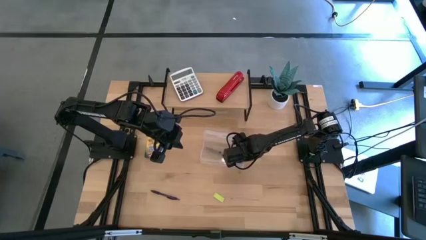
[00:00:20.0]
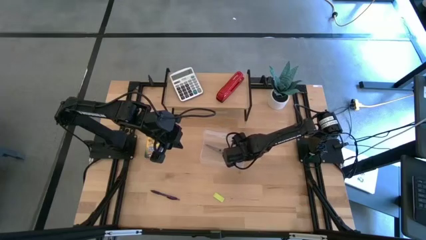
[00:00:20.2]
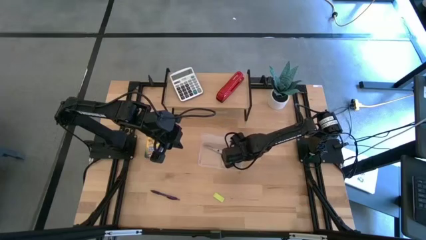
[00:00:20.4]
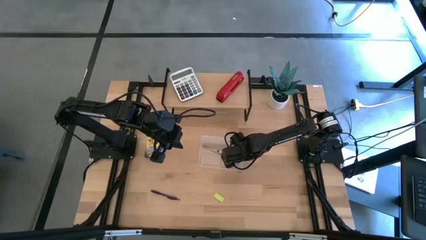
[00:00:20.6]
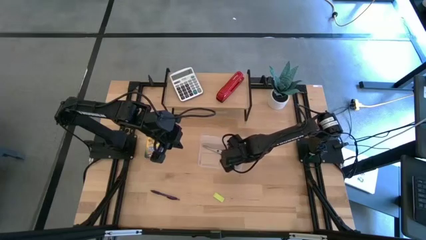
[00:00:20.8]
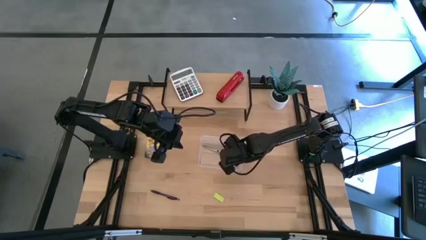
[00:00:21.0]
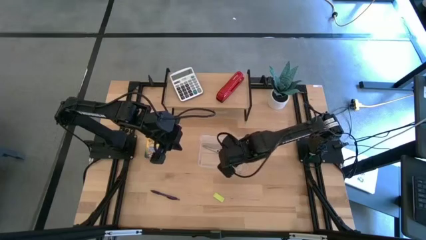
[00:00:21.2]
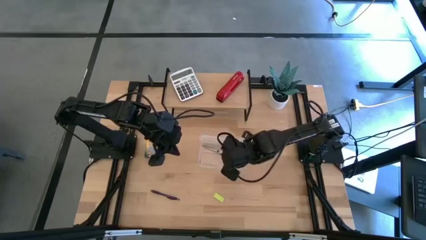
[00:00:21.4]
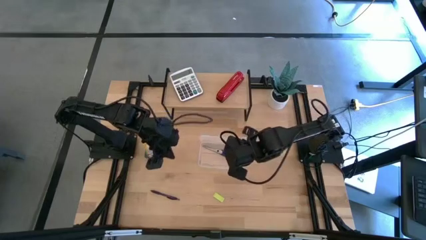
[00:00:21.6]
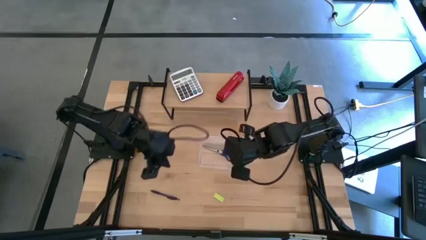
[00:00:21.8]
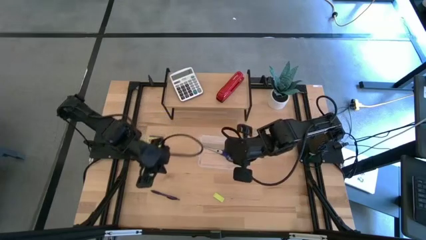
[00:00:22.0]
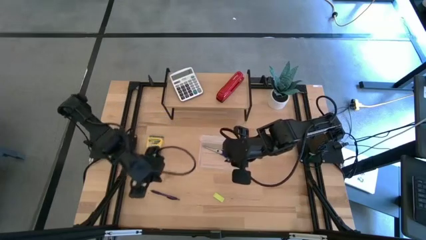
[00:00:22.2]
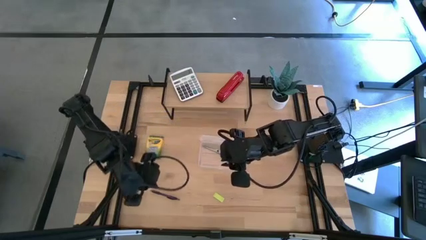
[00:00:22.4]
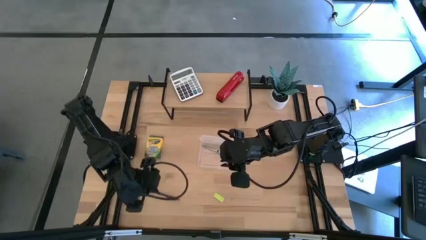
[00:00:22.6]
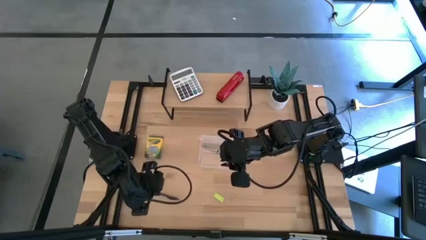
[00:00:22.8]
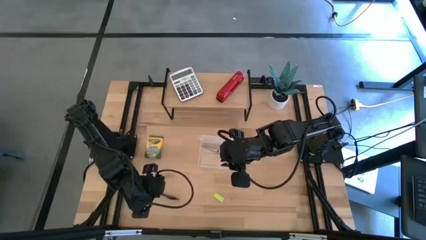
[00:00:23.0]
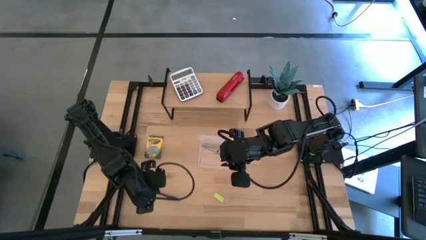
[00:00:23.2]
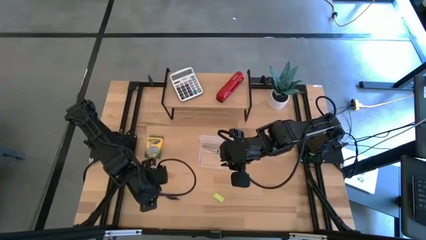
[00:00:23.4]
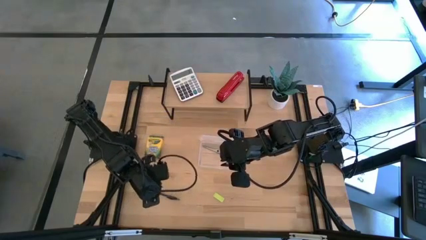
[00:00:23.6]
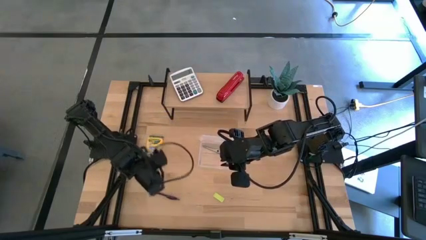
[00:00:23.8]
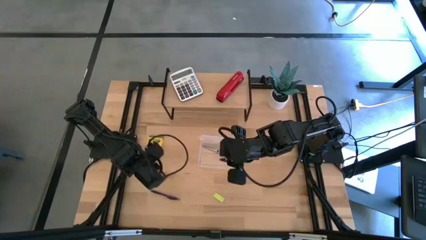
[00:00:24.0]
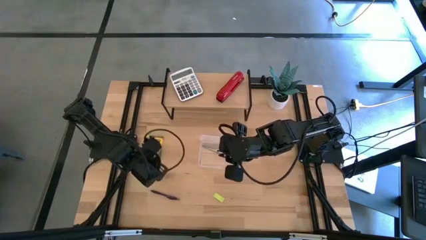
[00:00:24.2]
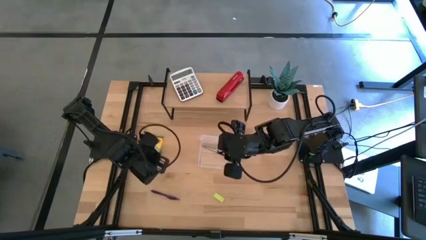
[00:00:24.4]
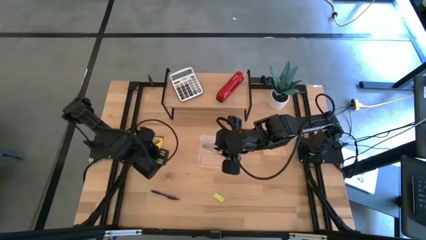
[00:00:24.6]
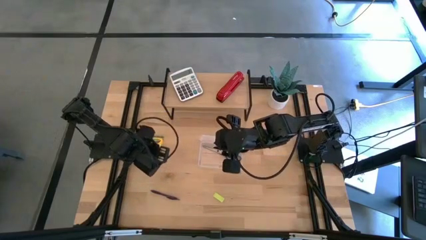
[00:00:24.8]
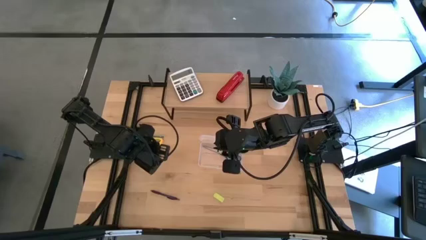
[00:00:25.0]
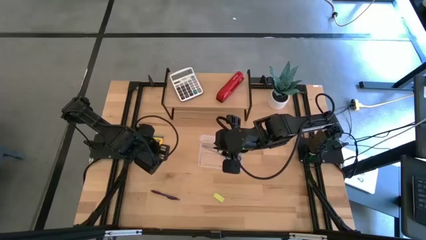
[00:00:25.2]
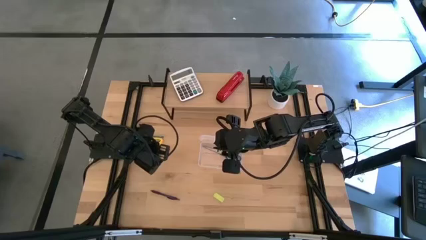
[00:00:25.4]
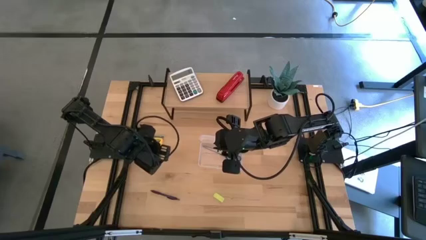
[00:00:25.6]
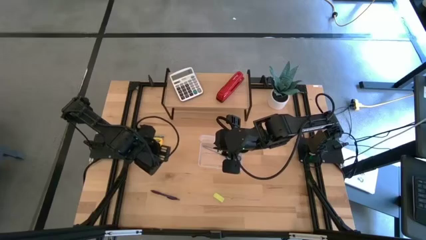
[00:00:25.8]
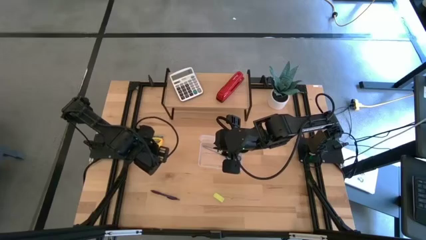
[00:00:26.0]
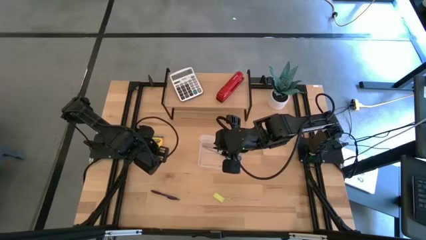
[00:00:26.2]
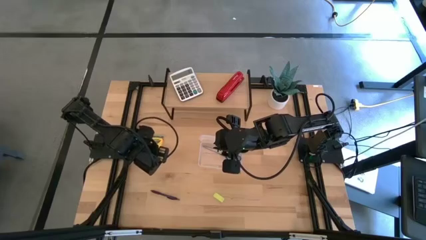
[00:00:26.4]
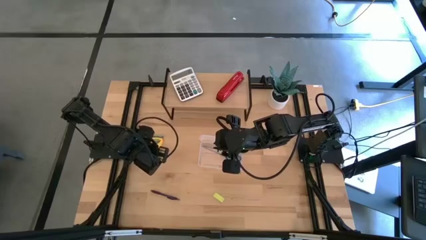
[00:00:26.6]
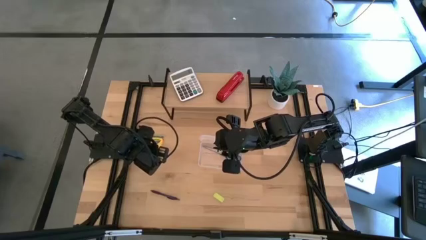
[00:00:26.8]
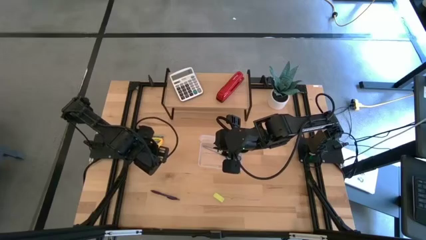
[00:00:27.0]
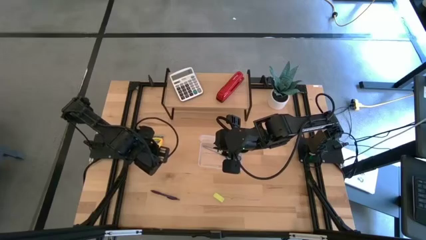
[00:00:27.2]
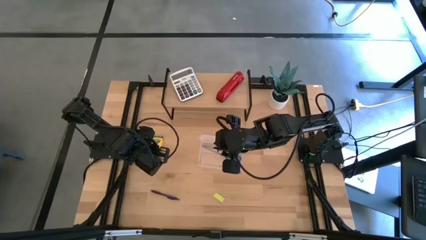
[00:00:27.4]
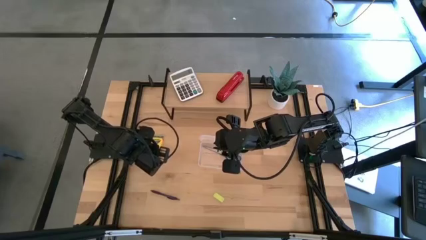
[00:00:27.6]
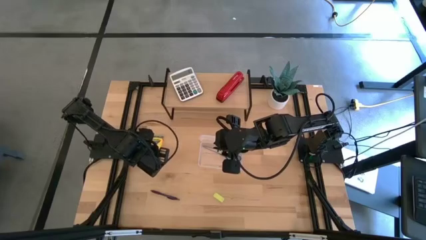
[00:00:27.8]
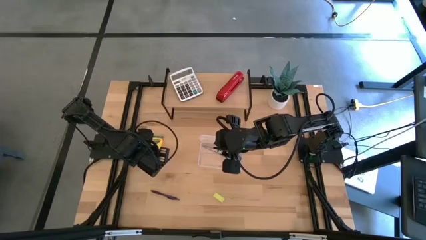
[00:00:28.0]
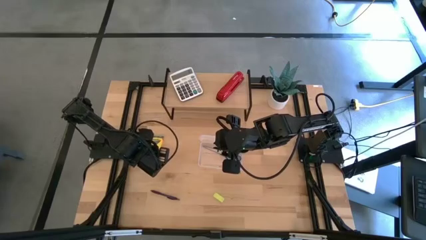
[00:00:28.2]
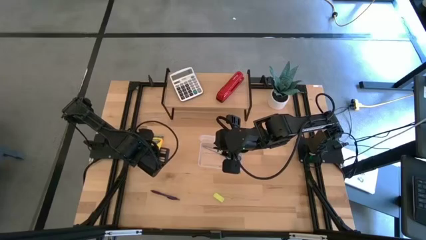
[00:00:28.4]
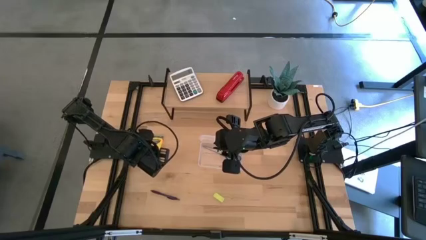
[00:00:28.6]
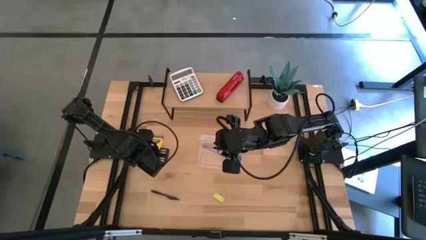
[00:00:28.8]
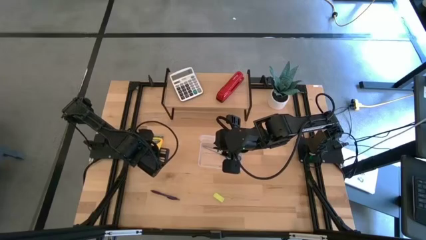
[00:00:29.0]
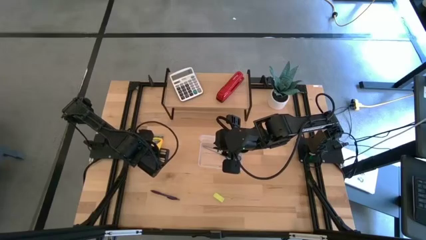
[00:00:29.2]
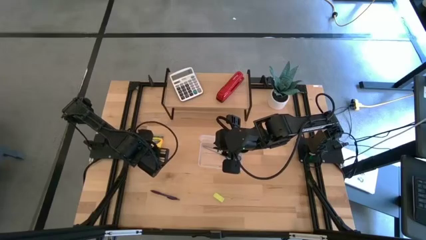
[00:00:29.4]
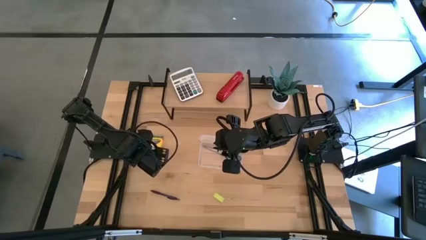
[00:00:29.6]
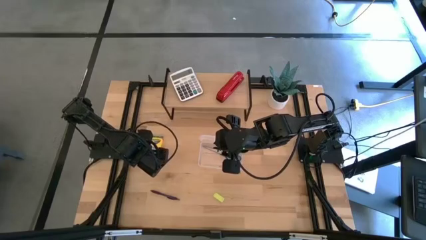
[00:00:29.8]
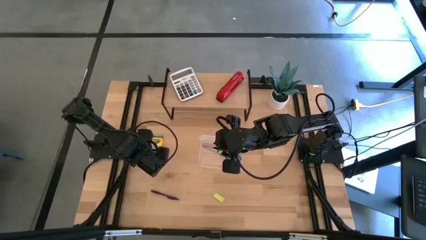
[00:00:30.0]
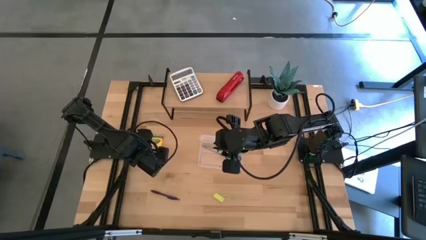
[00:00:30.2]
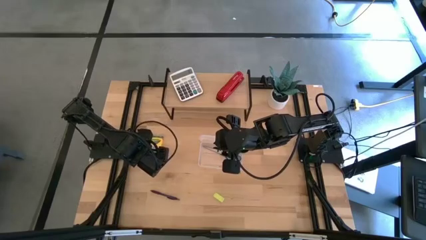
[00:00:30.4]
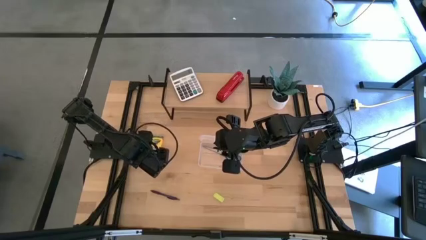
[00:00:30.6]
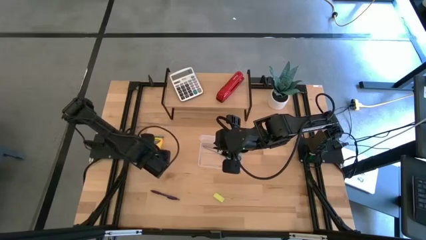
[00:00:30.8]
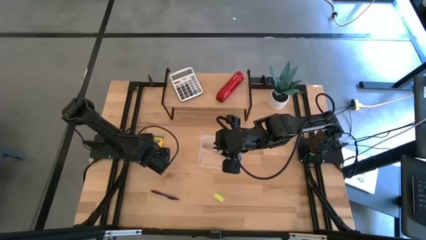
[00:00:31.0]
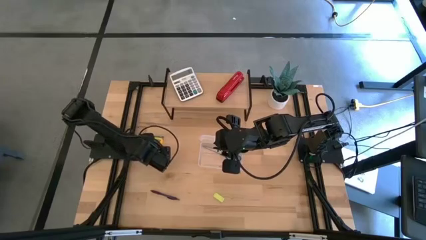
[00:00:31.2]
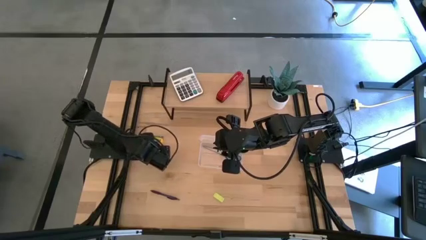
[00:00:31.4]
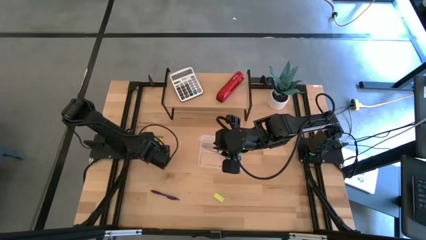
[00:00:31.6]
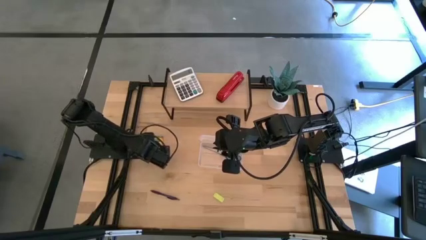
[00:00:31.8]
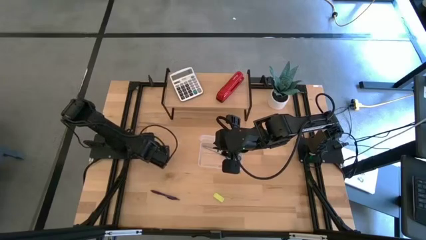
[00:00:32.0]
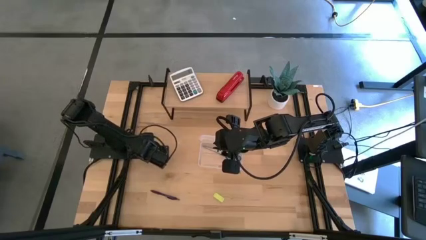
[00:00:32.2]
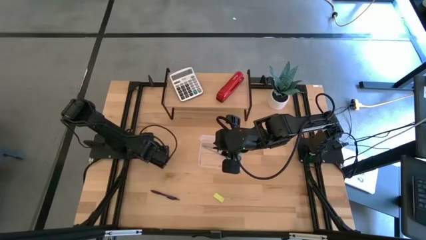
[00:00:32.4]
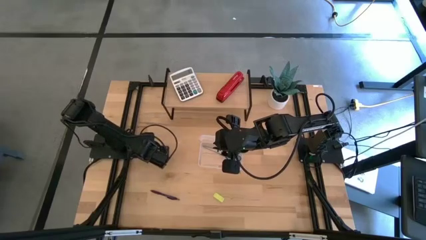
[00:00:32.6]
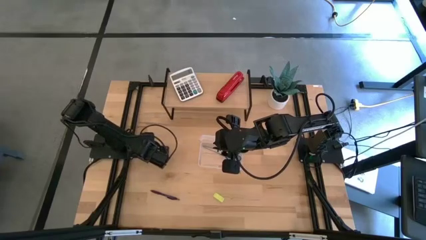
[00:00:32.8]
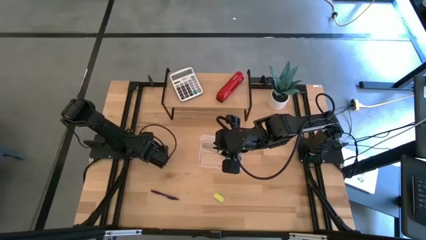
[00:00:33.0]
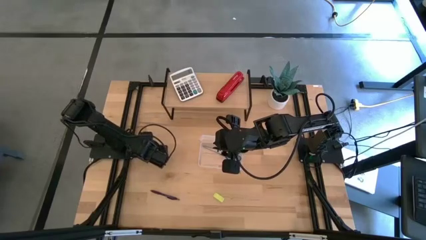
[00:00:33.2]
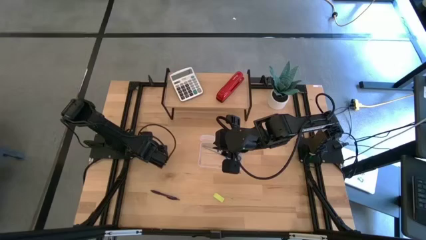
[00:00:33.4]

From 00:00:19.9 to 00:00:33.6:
Task: Pack school essentials
Put the yellow crayon box into the transparent supply box
